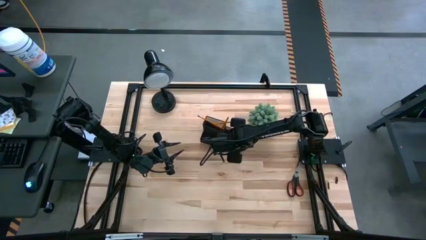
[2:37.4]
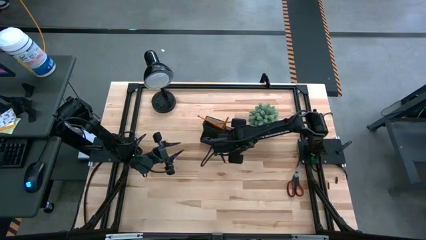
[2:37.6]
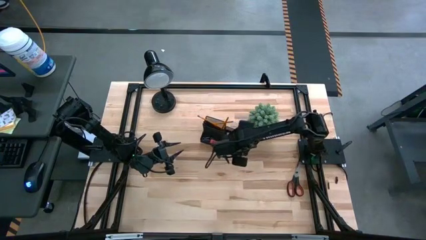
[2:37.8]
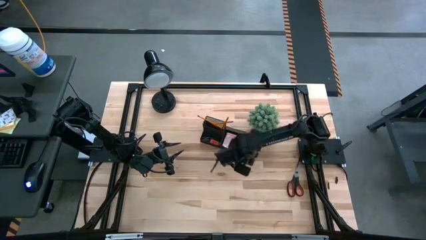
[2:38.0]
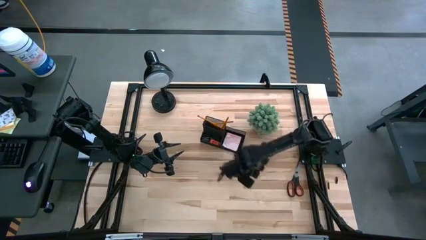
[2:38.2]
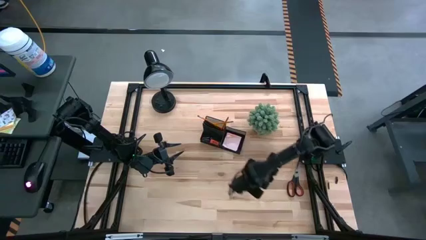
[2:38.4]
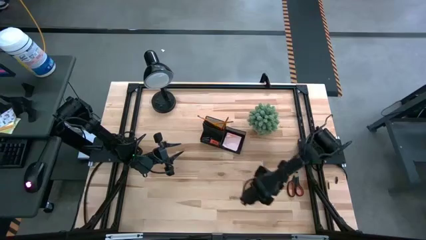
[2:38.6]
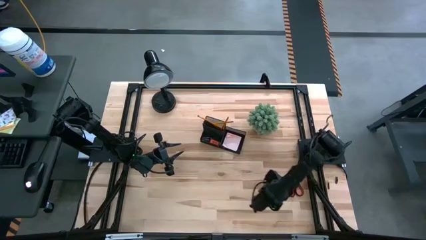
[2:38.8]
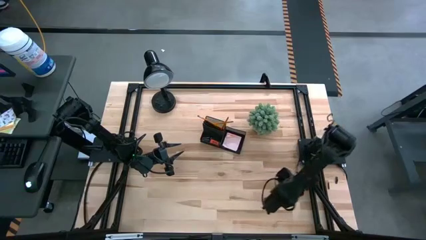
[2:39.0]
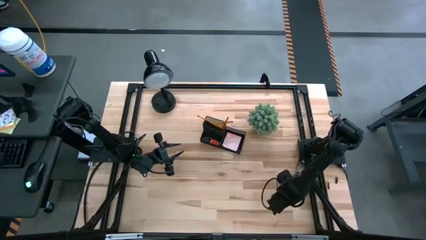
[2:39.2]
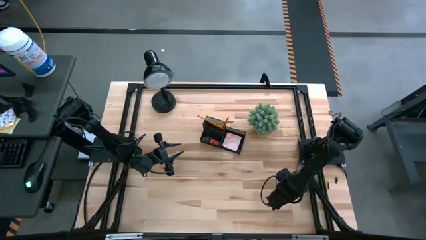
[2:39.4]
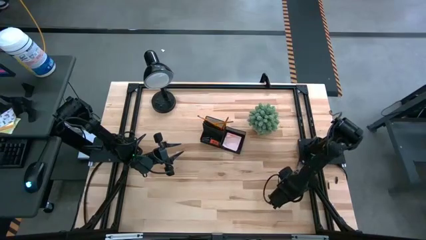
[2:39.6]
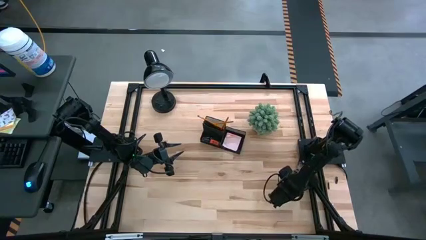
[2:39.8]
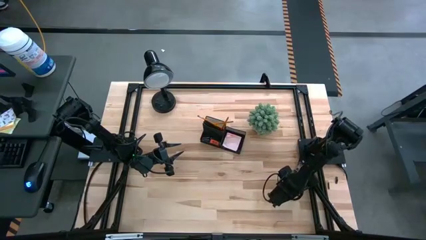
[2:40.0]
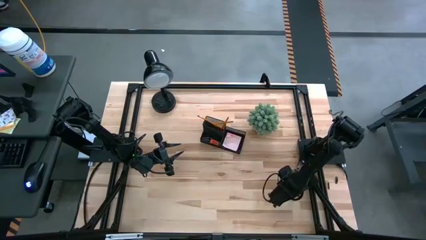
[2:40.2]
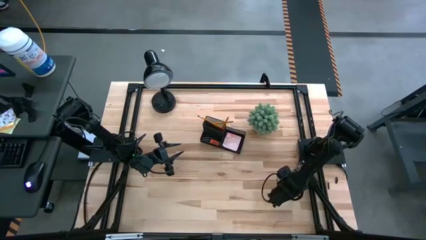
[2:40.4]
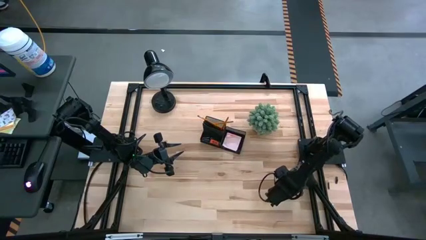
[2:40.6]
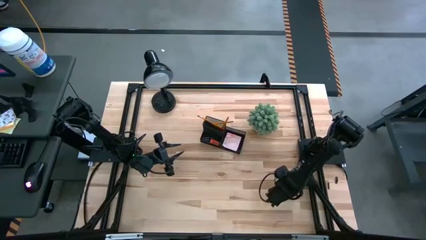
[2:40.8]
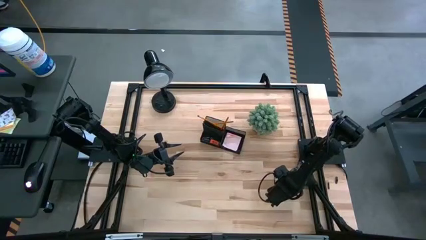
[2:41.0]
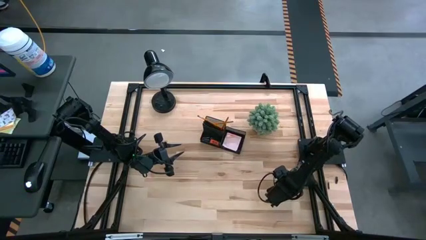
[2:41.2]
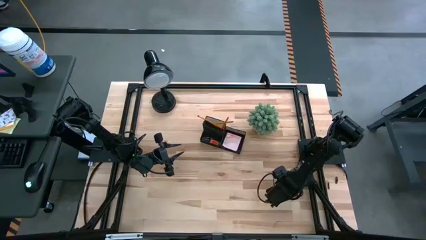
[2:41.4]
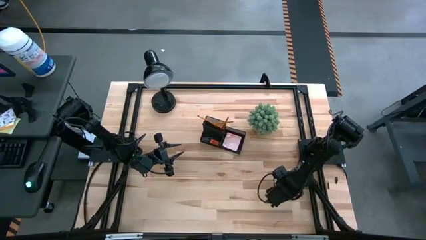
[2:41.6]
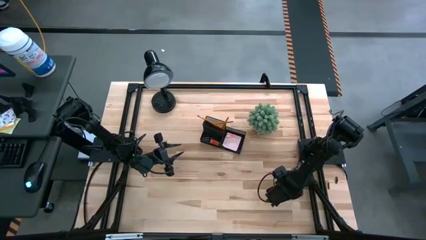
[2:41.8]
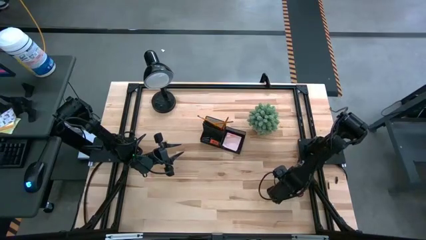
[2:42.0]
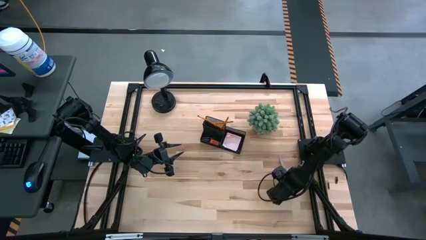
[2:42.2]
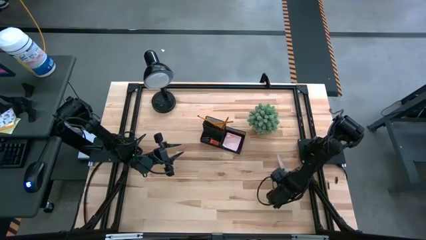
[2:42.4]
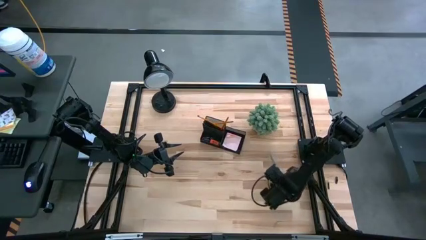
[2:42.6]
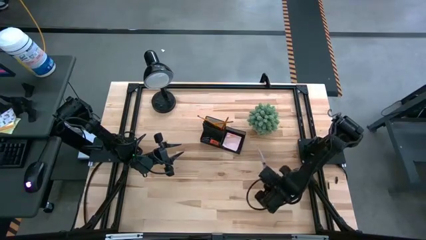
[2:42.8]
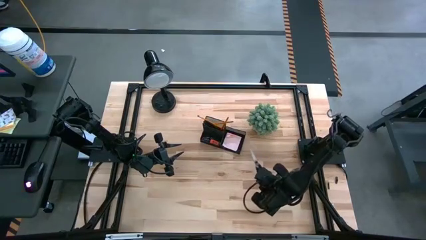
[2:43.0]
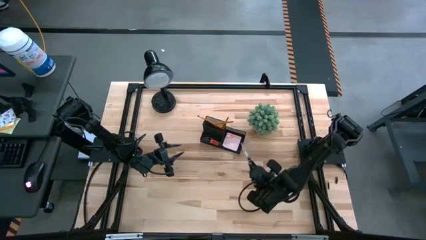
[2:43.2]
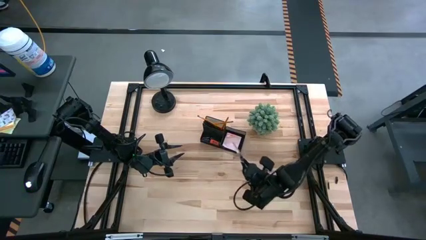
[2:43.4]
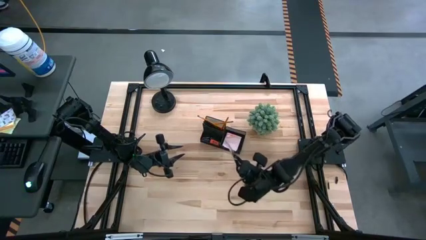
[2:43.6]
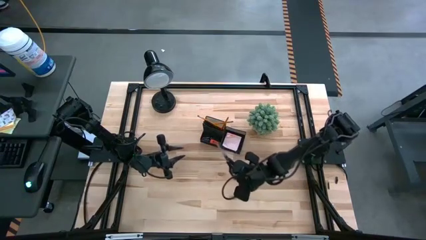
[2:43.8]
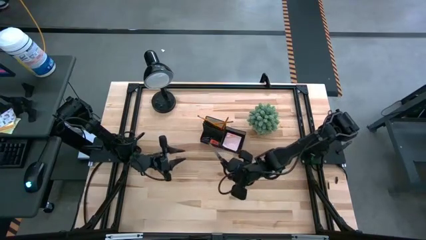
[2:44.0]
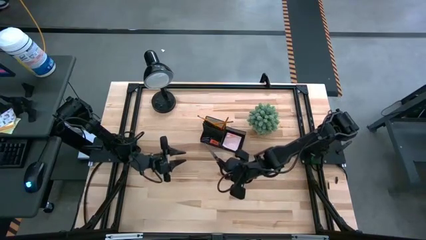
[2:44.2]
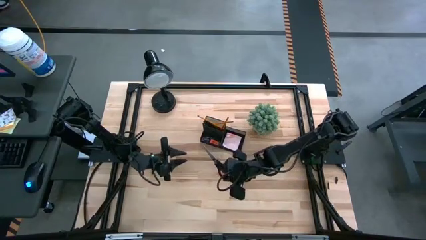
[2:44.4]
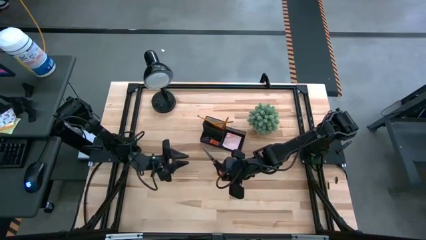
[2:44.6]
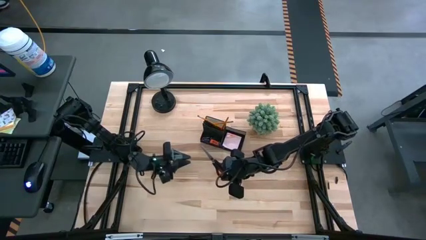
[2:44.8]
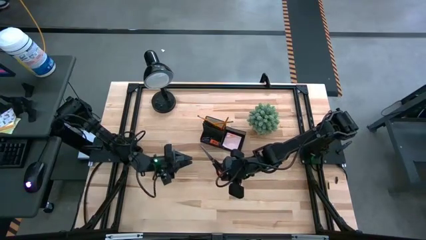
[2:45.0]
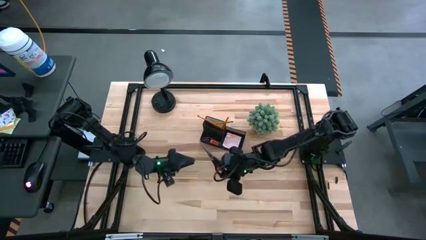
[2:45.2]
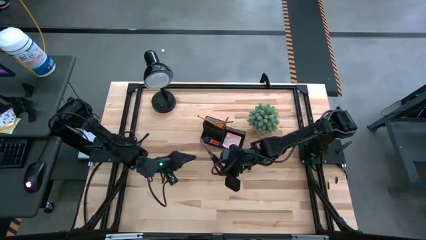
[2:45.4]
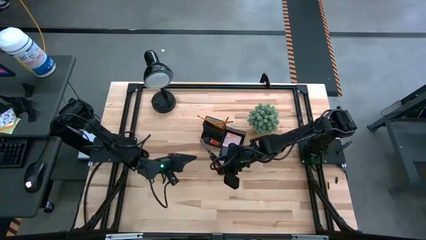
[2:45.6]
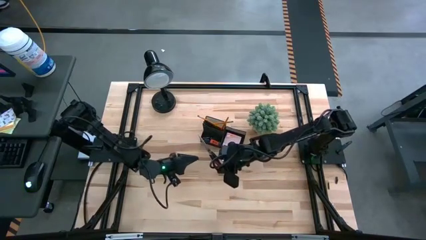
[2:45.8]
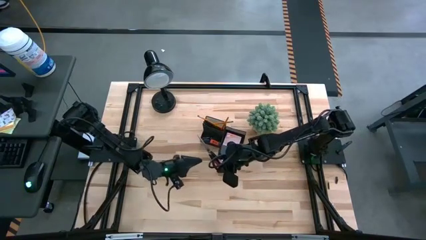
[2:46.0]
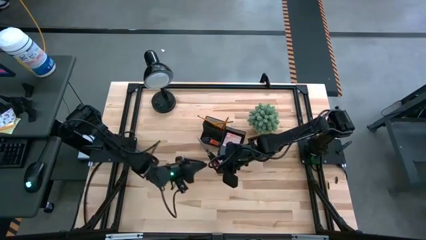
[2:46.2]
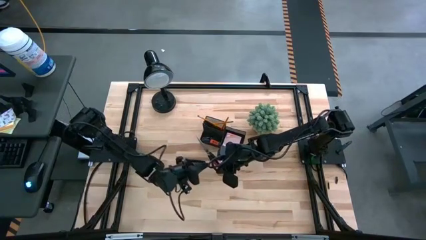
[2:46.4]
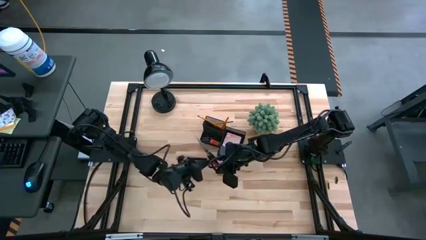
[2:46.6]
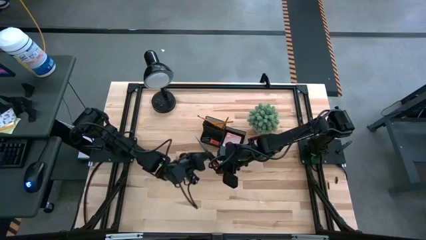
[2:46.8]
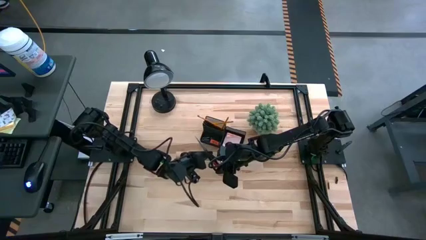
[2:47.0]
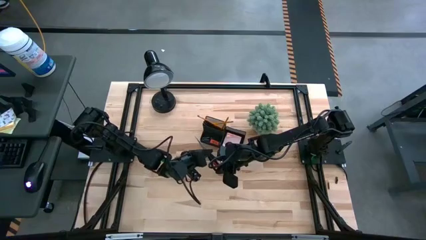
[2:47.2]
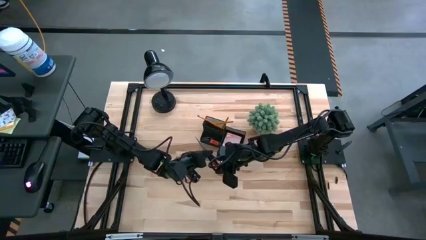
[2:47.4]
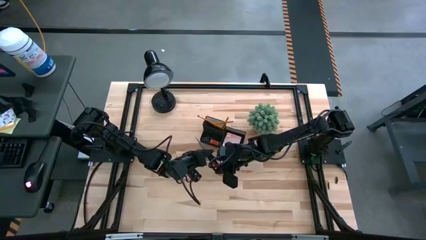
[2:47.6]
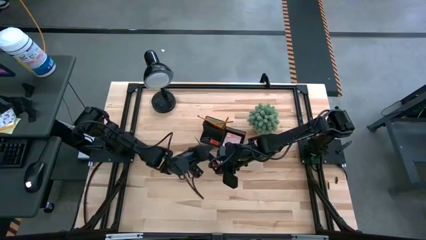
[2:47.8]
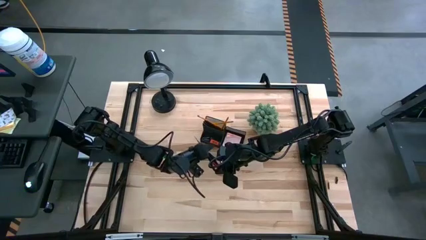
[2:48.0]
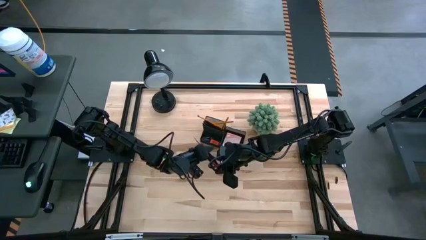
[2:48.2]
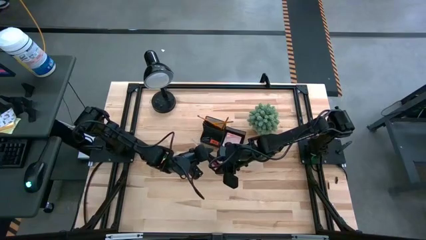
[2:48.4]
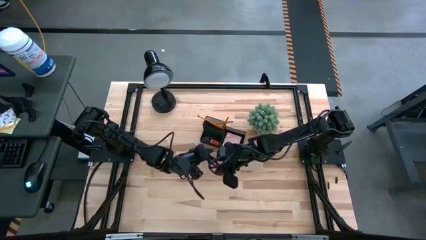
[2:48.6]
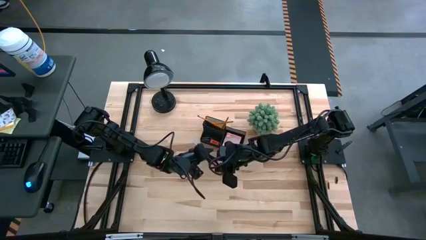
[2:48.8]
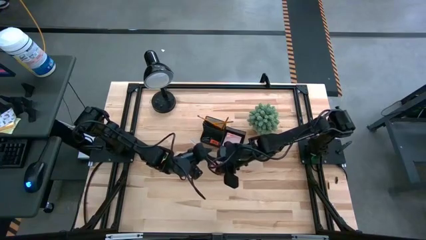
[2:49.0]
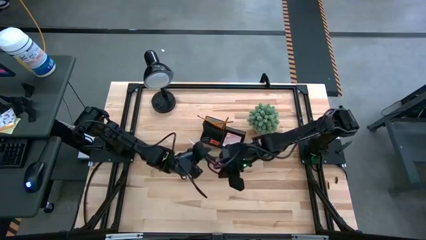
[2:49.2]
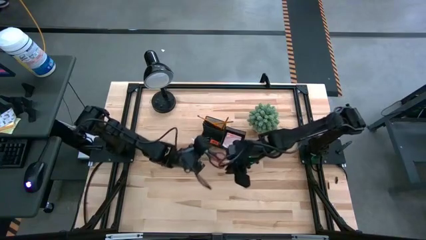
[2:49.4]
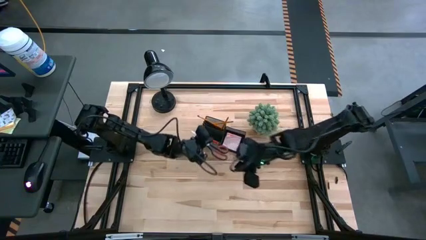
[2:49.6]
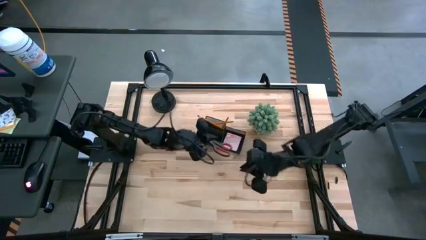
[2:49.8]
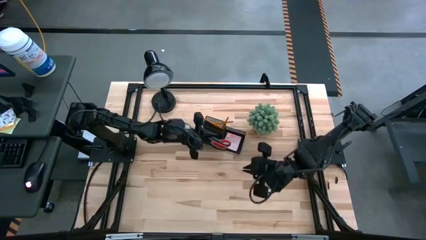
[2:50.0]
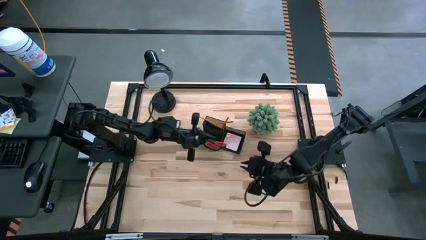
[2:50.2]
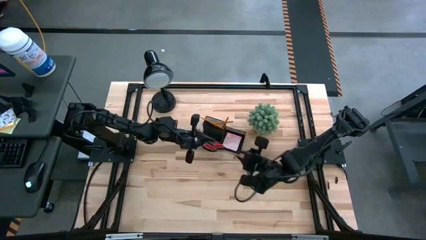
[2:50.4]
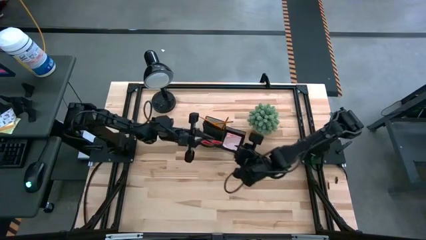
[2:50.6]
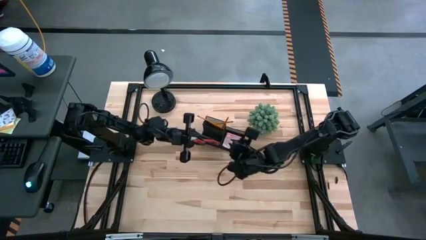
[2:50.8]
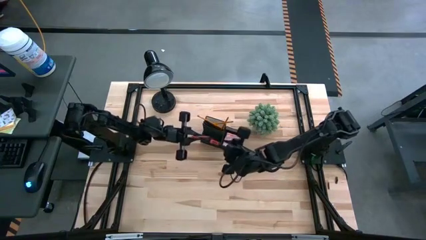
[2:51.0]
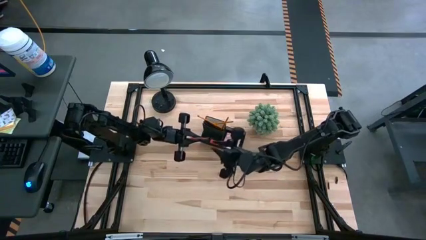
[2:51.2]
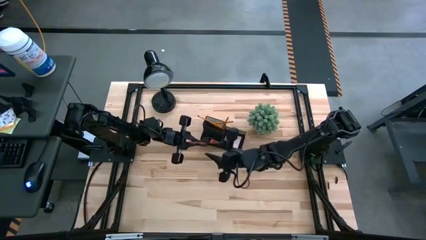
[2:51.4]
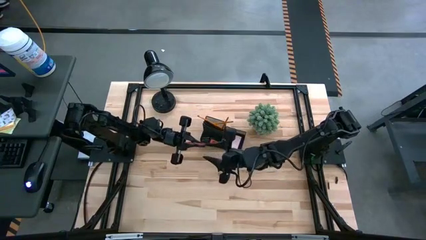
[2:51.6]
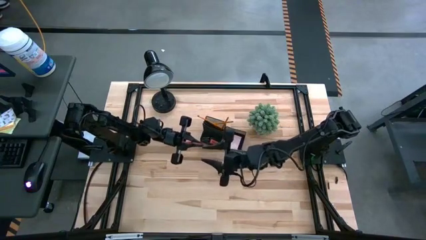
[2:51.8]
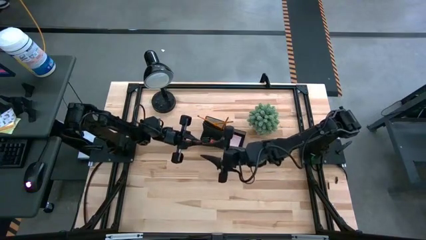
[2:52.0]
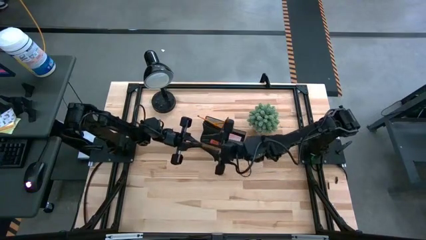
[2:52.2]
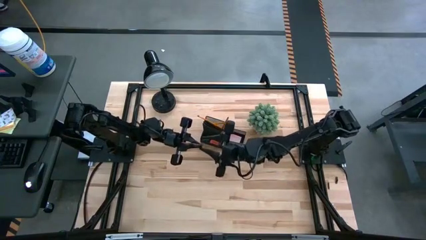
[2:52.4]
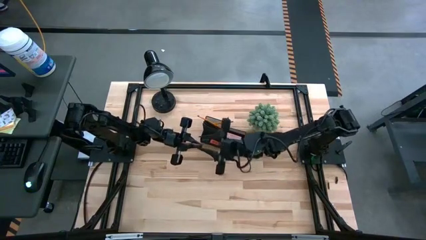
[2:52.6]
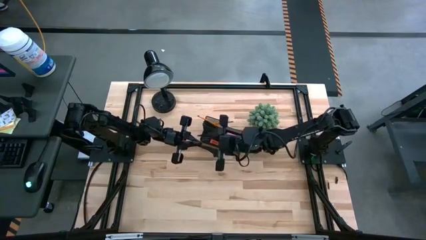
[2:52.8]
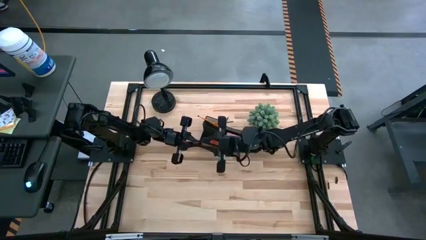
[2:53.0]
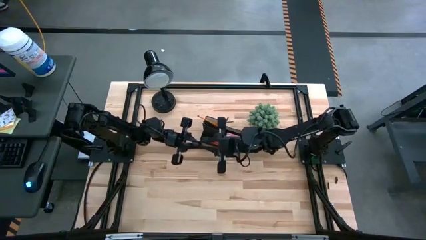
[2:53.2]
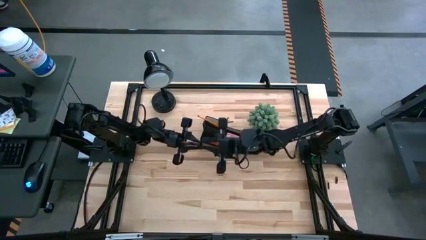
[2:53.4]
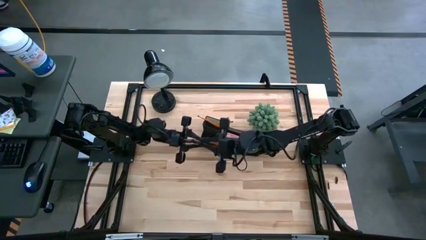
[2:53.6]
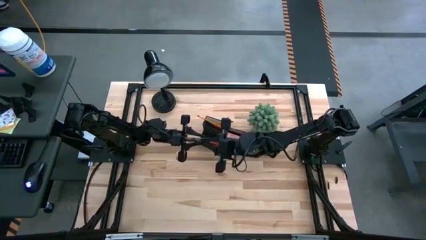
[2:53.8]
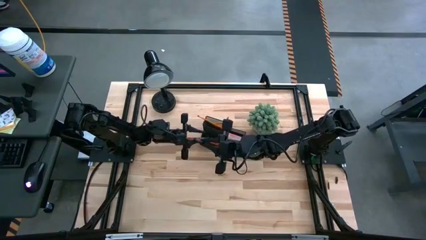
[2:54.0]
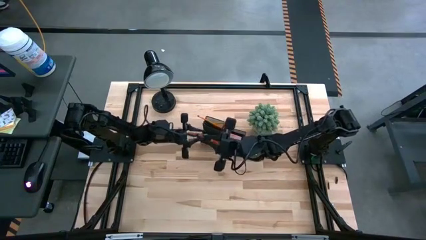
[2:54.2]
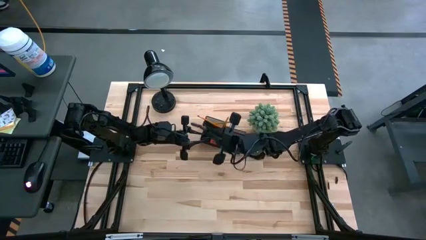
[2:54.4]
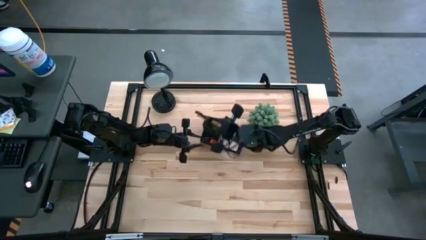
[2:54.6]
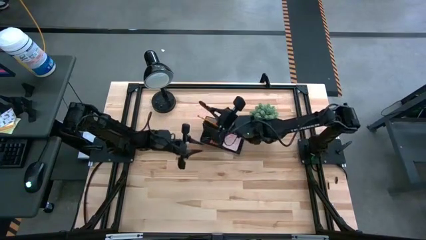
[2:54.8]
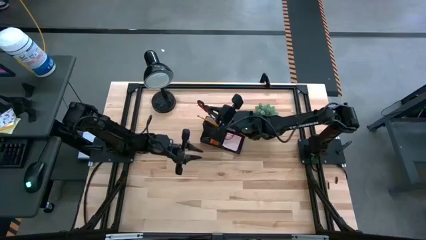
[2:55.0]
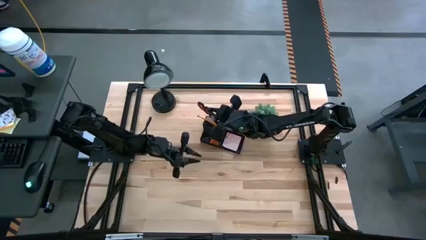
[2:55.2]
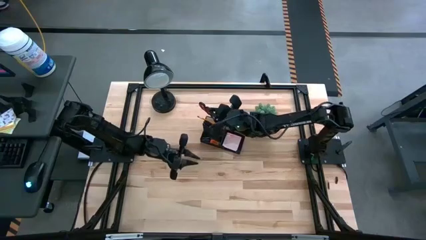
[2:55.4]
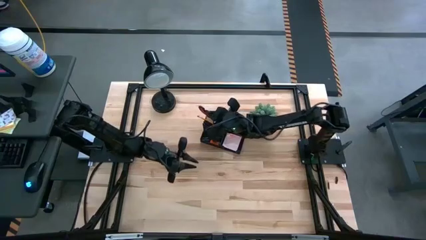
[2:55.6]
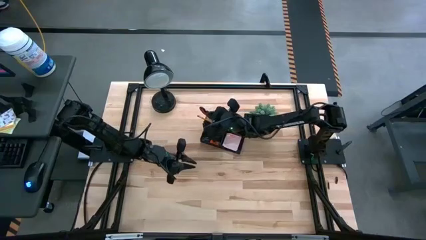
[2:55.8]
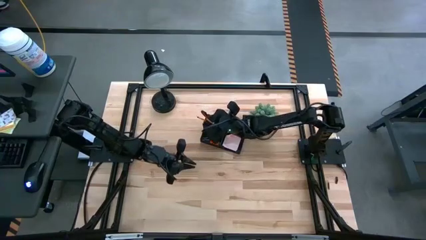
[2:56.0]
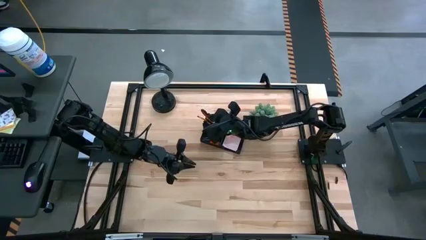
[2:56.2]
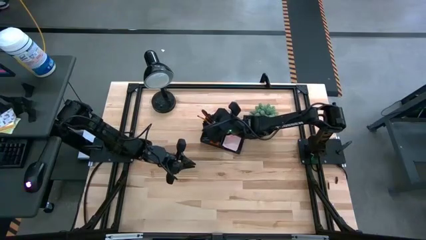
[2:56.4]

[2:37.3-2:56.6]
Task: Pick and place office supplies into organizer
Put the black scissor into the black desk organizer
